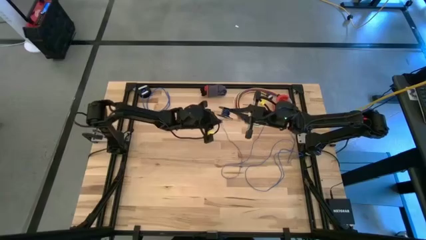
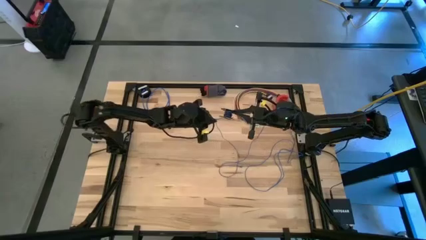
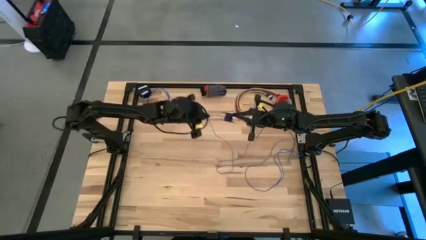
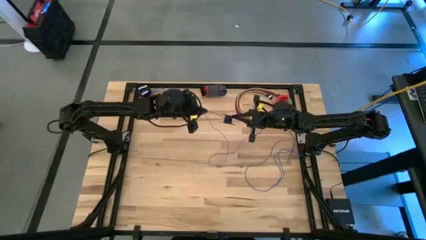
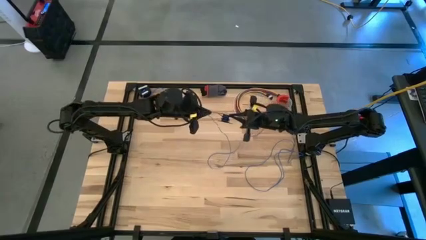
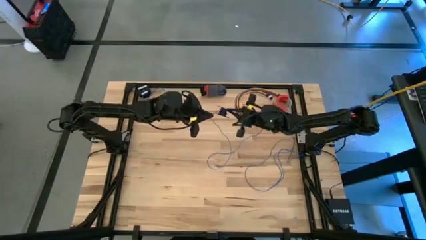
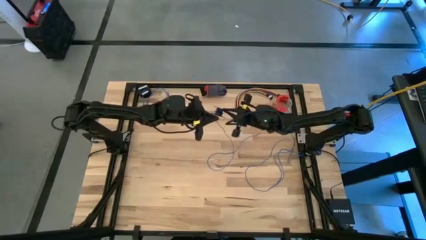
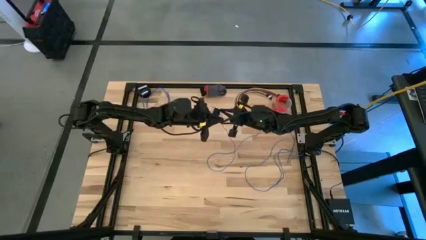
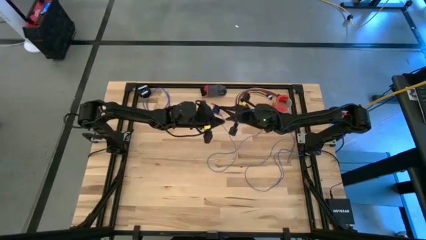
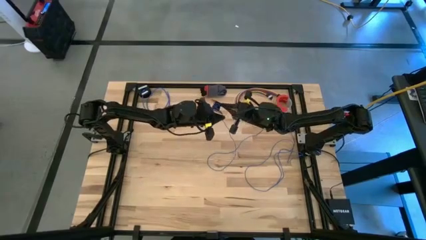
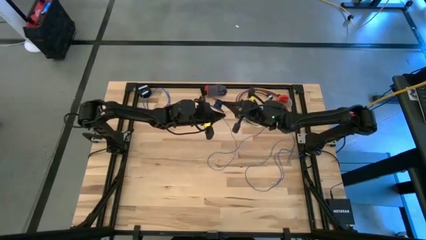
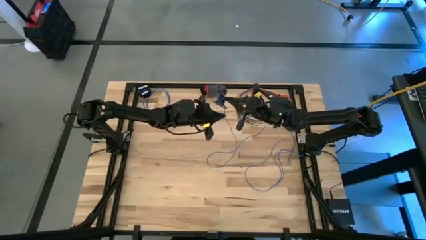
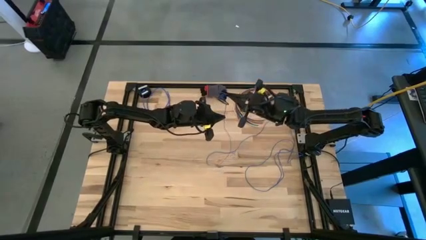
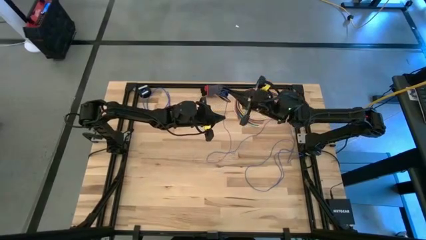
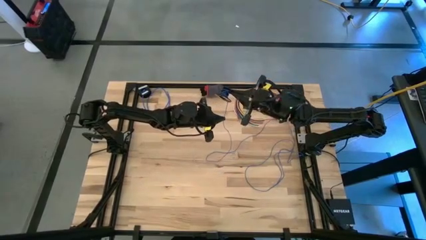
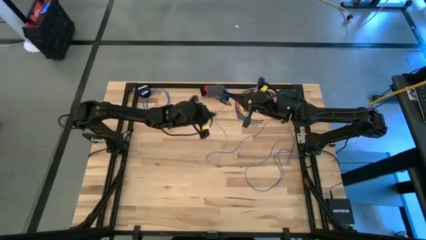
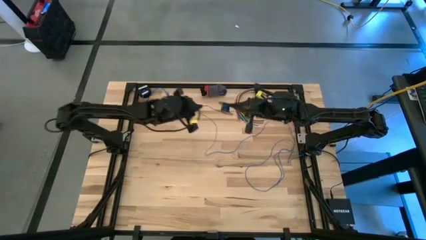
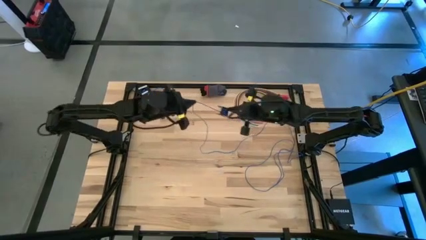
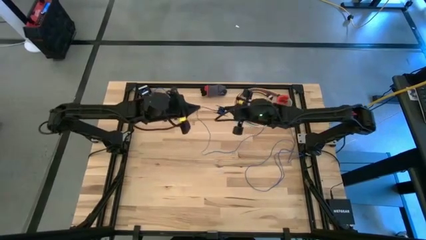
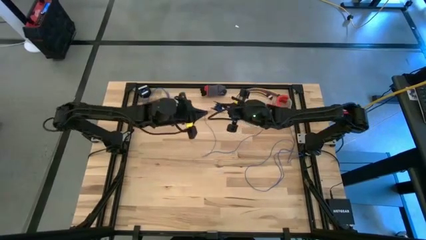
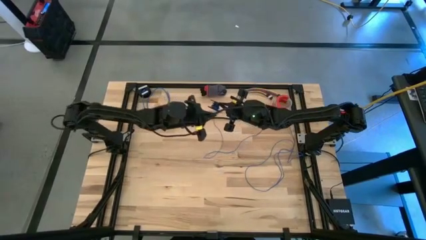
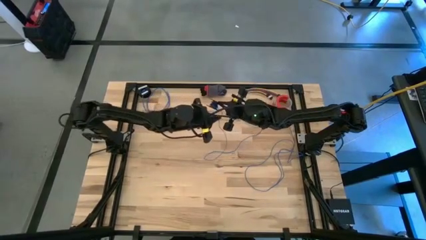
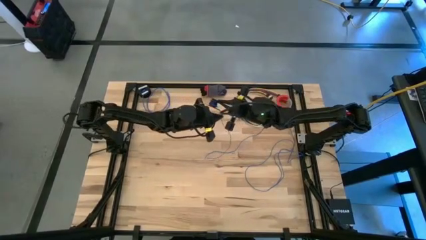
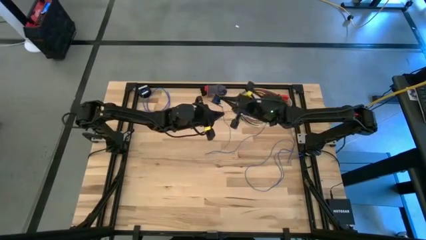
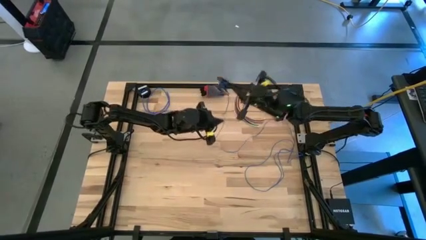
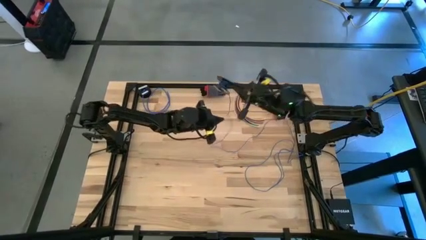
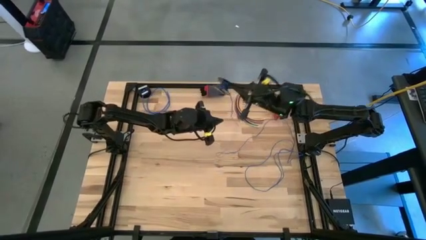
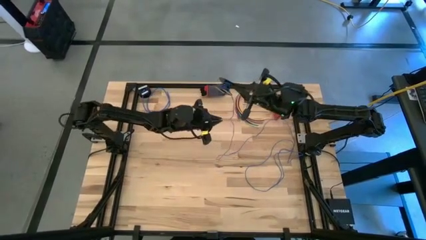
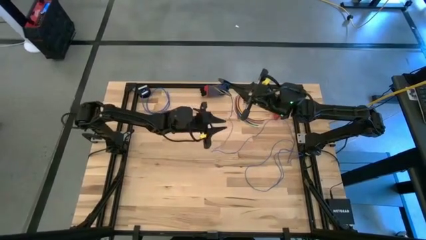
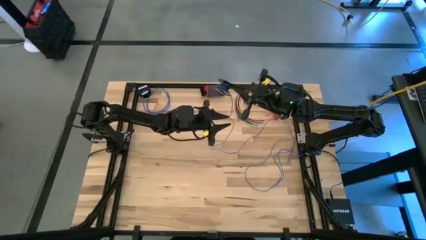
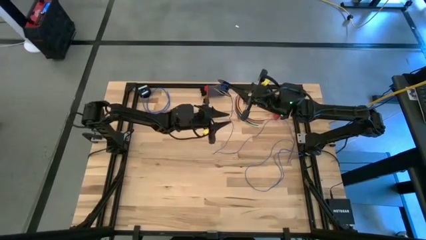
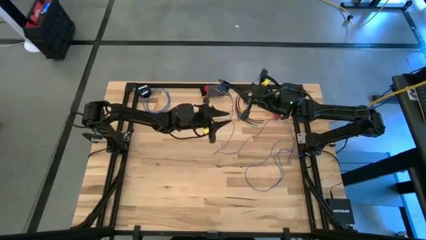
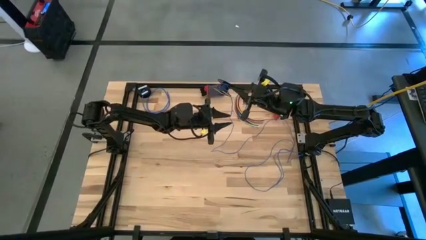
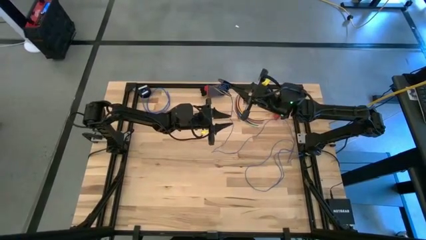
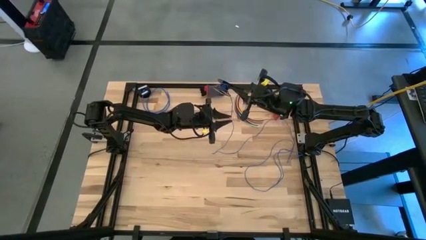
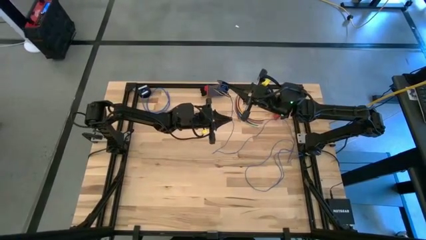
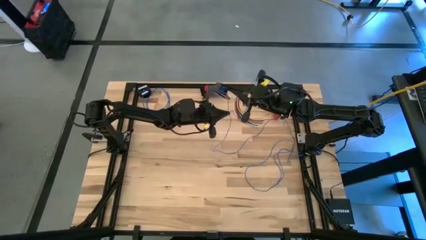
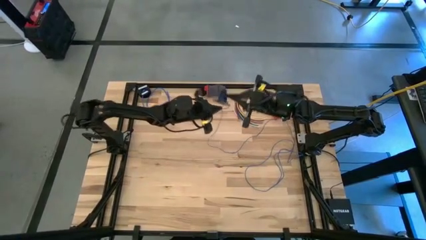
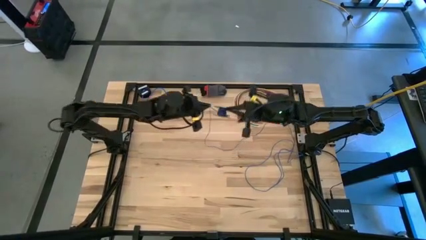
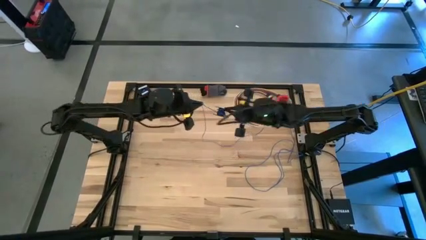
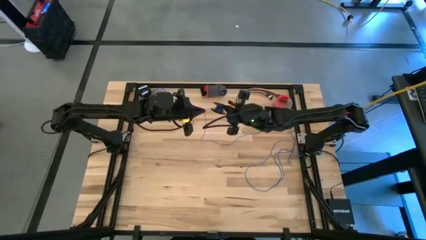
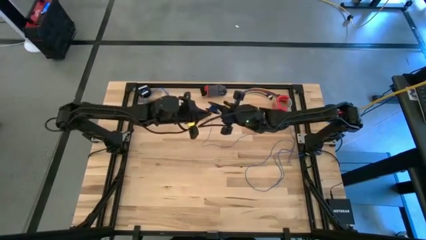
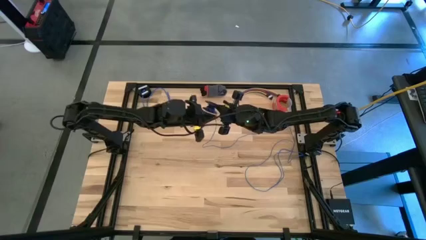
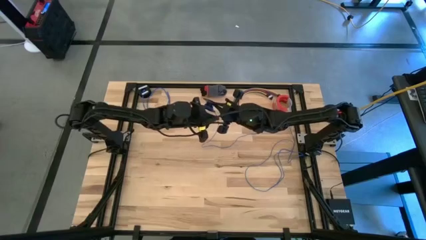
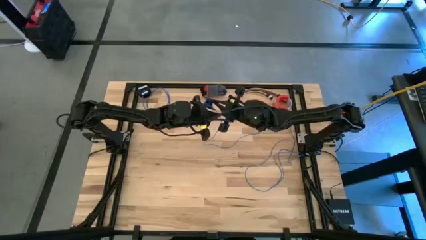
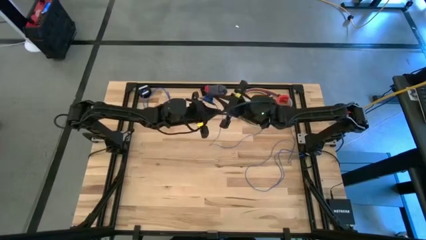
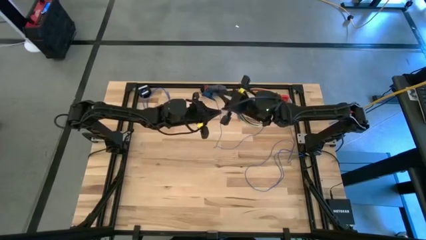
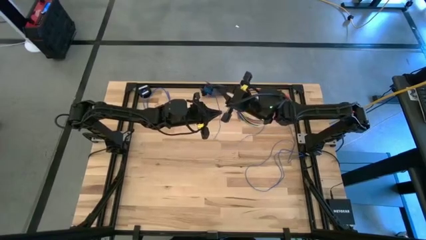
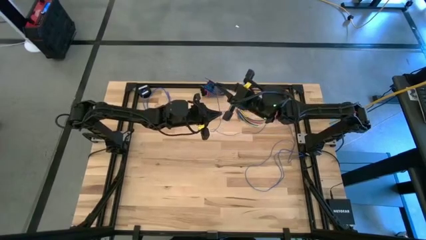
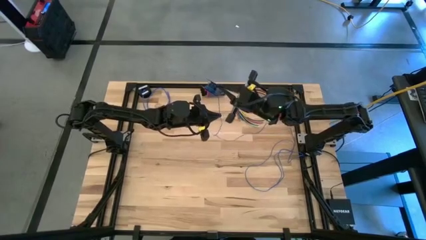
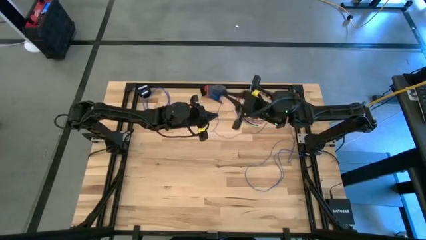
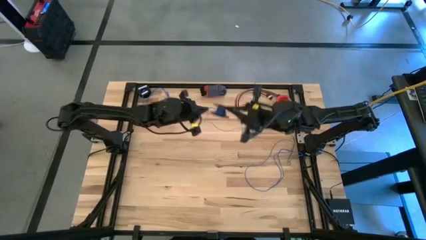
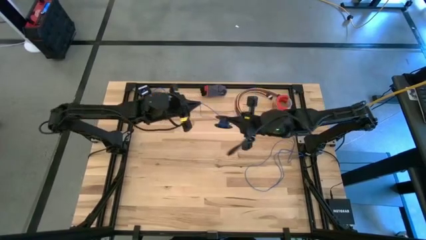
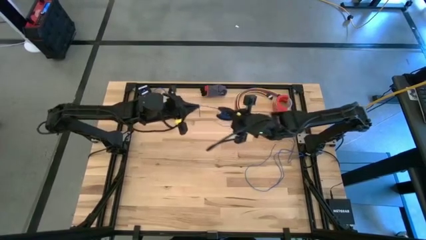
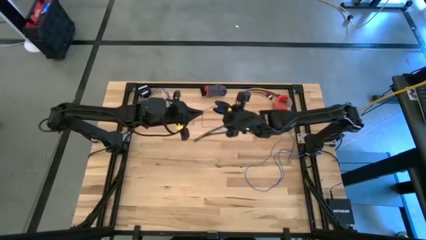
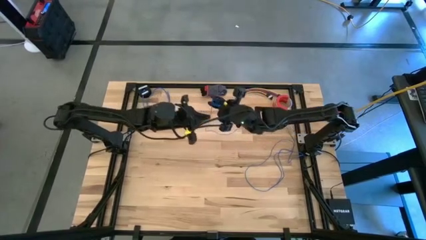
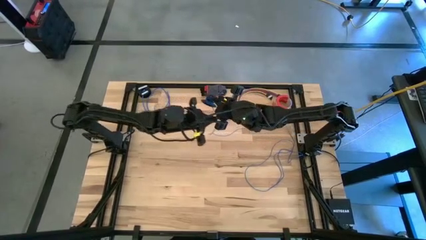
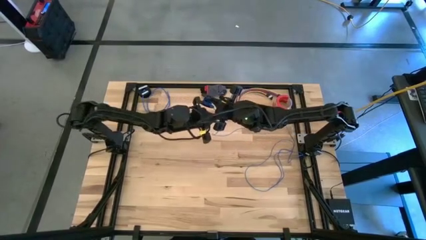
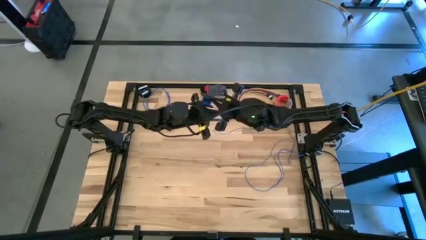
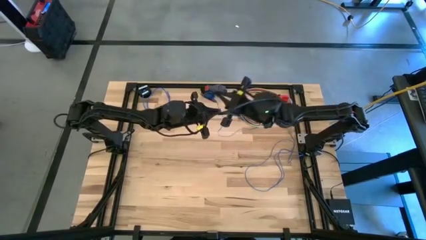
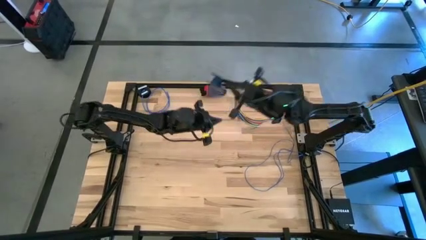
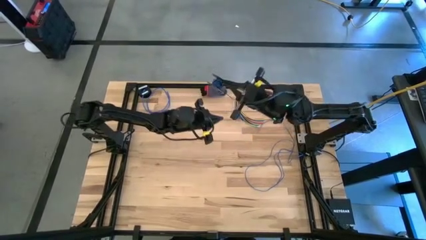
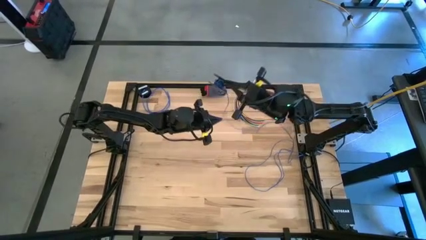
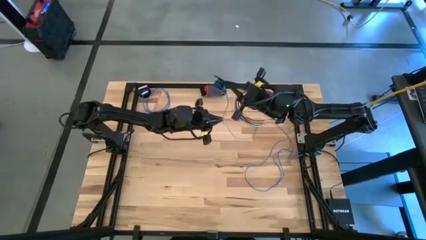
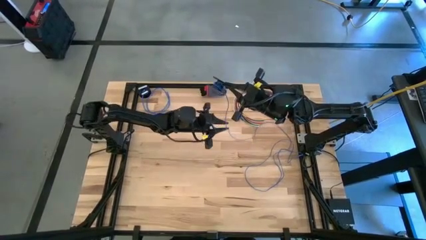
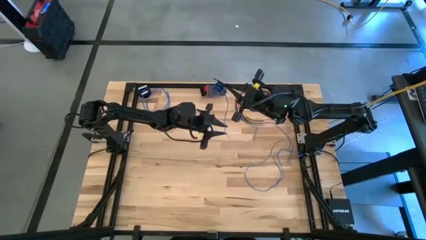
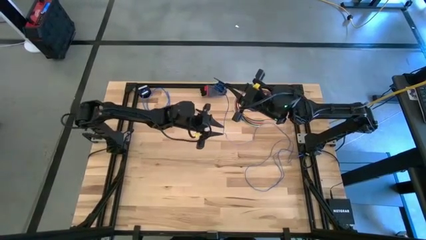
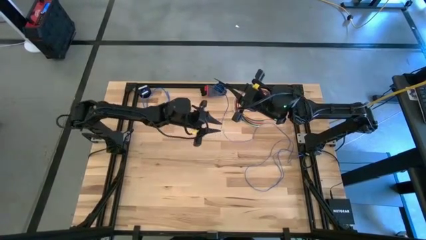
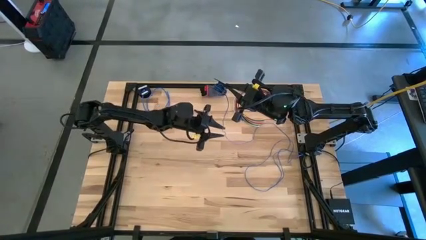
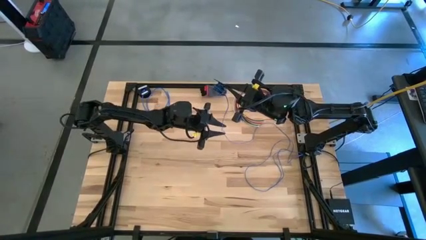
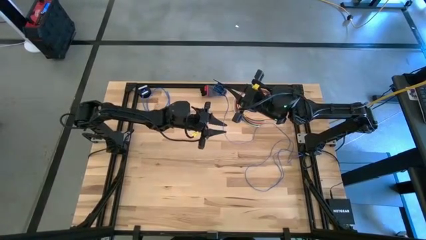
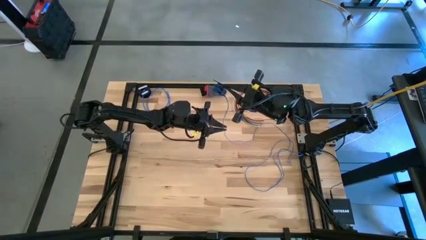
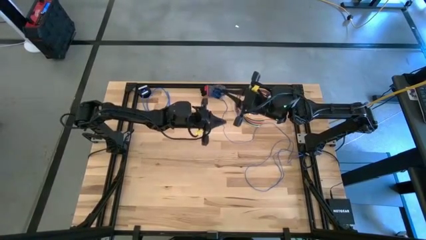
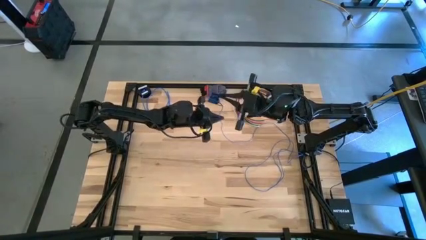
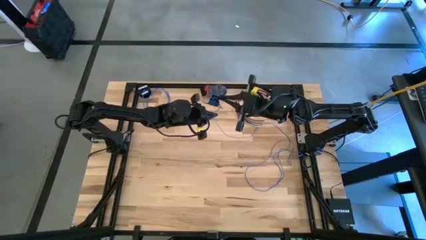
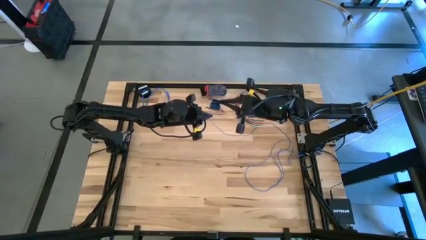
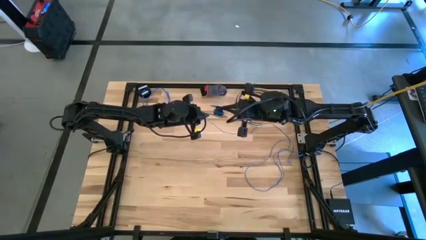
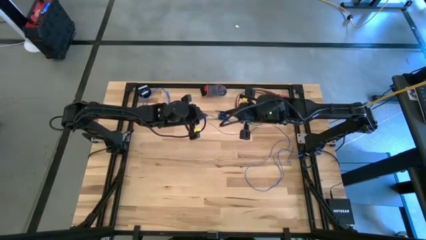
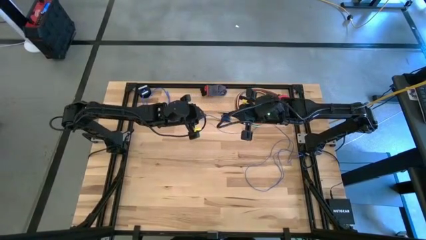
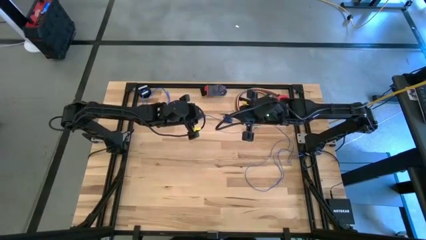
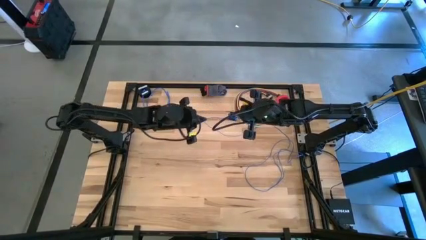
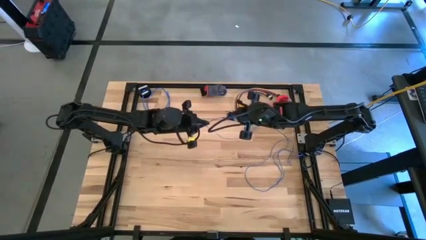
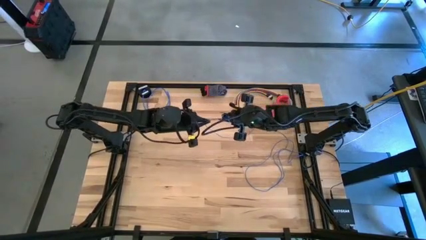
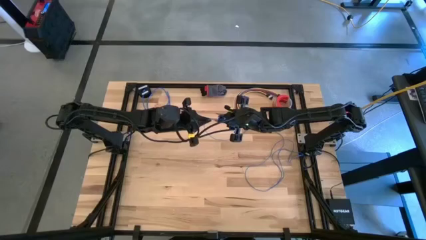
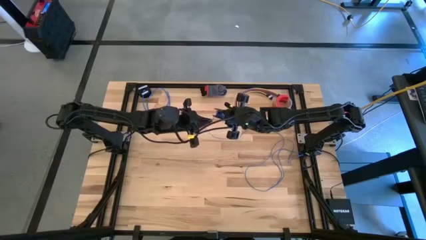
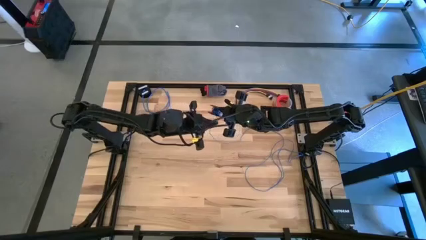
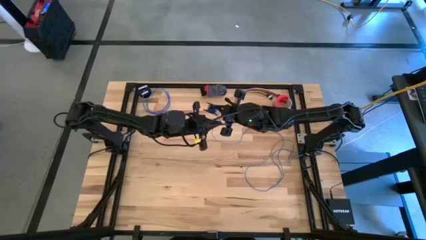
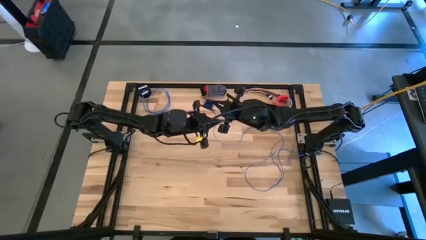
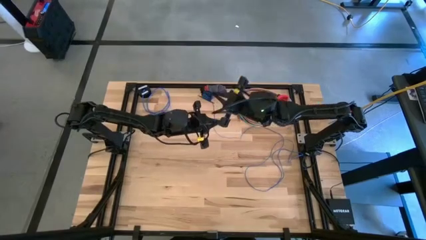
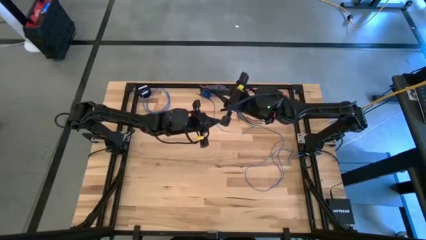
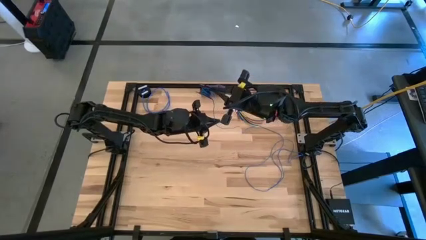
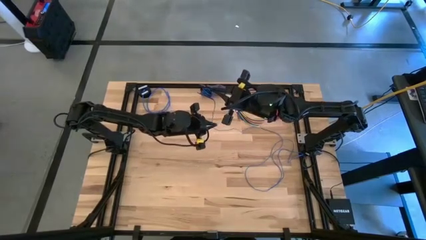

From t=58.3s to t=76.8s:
Task: Coil cords
Coil the blue wire on the black spool
